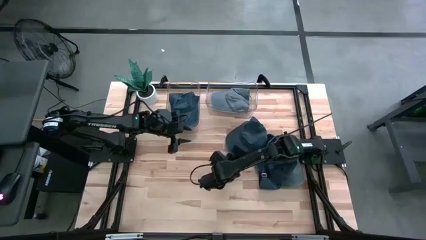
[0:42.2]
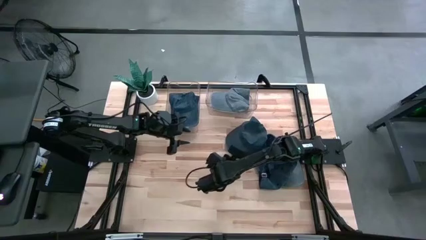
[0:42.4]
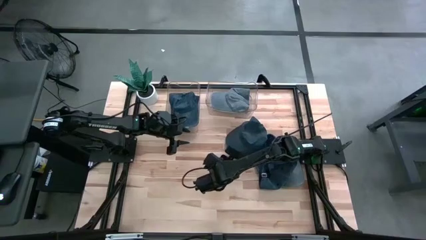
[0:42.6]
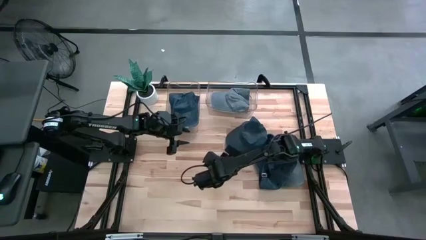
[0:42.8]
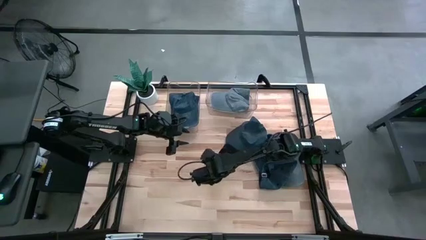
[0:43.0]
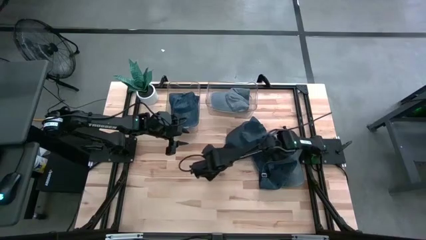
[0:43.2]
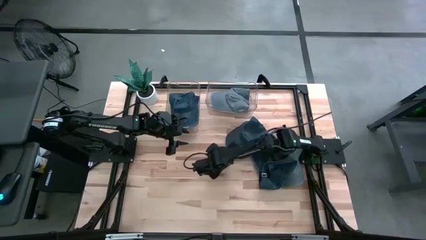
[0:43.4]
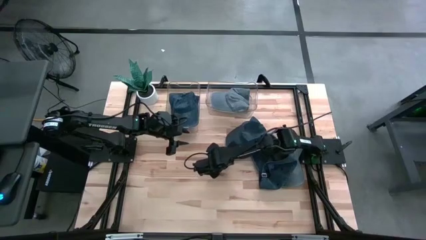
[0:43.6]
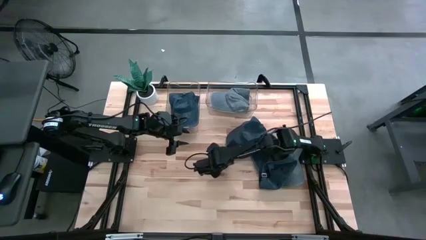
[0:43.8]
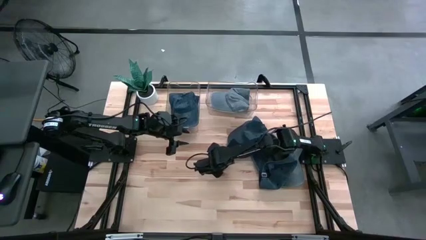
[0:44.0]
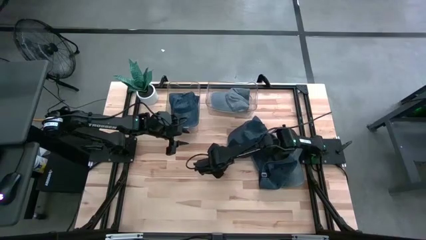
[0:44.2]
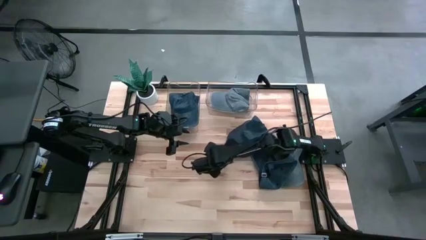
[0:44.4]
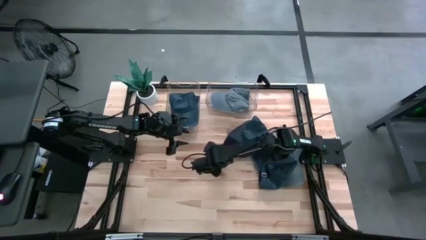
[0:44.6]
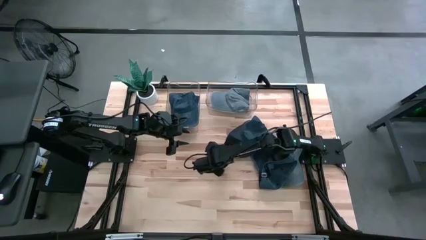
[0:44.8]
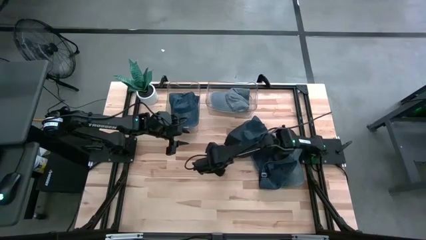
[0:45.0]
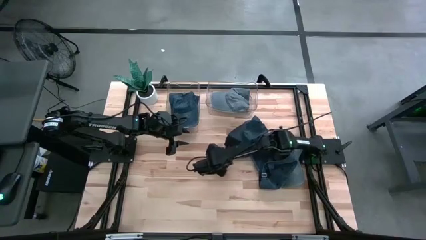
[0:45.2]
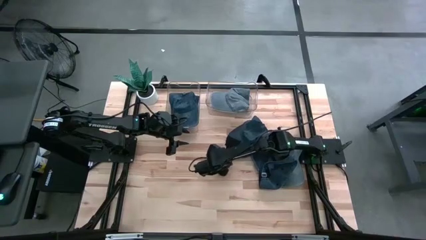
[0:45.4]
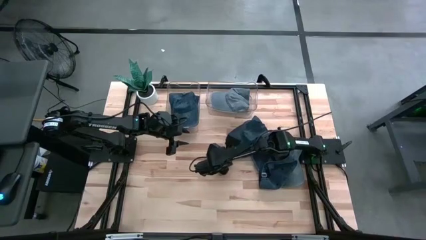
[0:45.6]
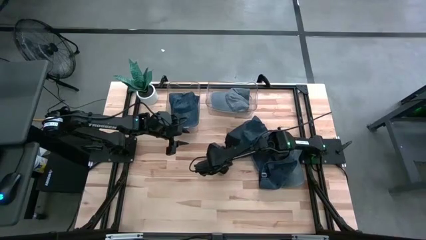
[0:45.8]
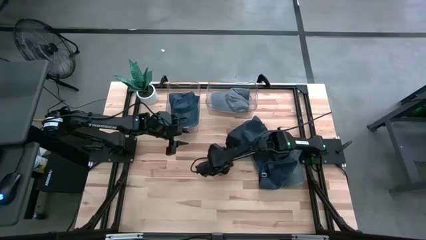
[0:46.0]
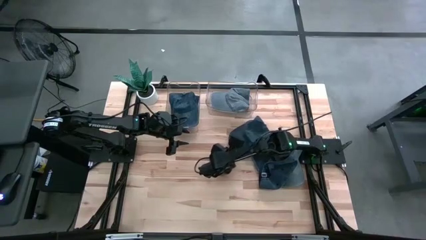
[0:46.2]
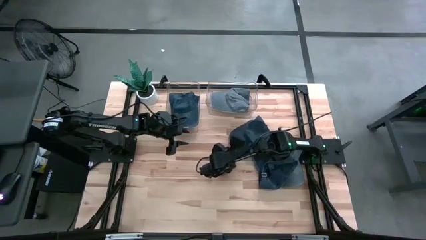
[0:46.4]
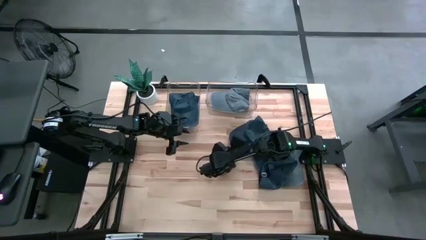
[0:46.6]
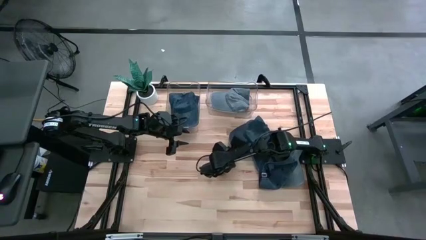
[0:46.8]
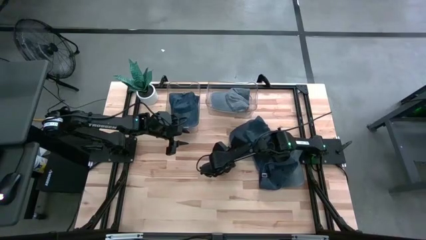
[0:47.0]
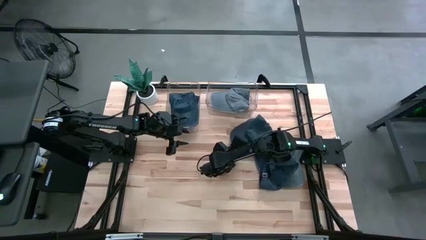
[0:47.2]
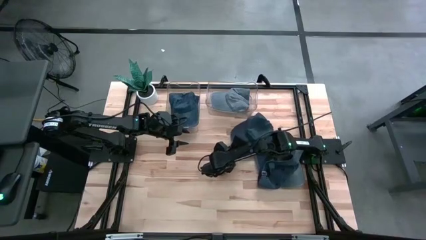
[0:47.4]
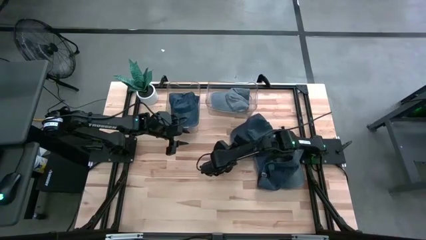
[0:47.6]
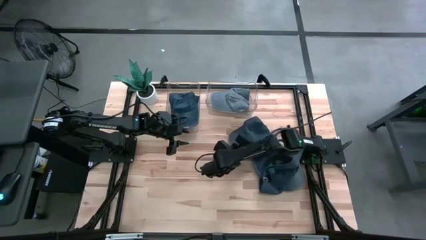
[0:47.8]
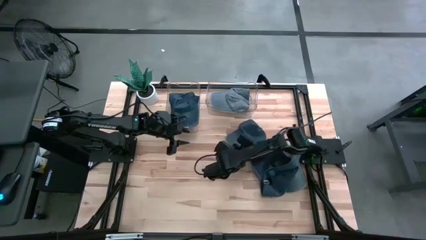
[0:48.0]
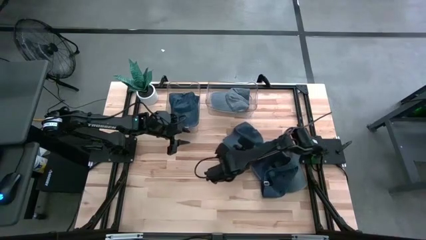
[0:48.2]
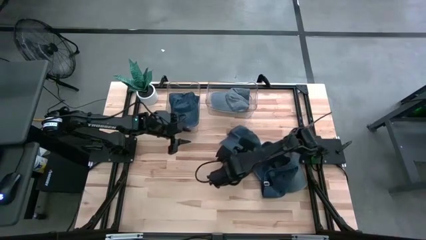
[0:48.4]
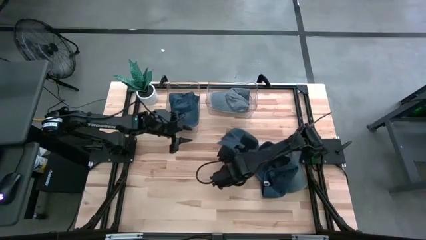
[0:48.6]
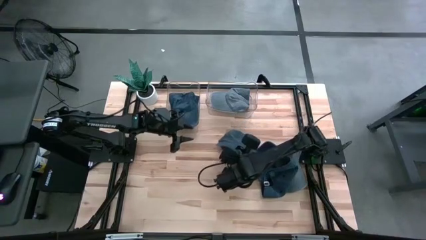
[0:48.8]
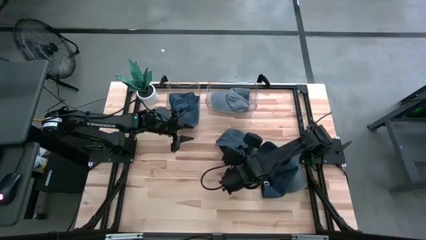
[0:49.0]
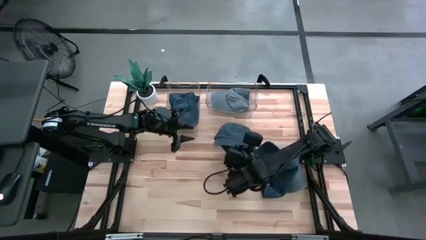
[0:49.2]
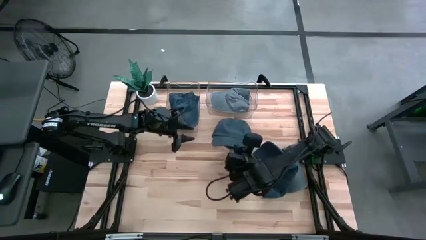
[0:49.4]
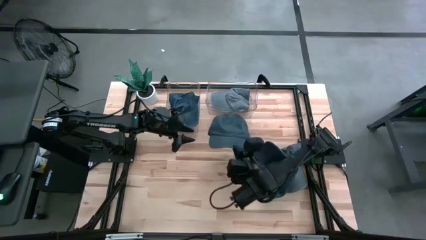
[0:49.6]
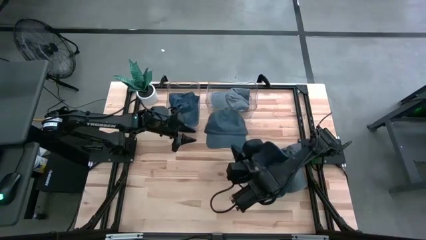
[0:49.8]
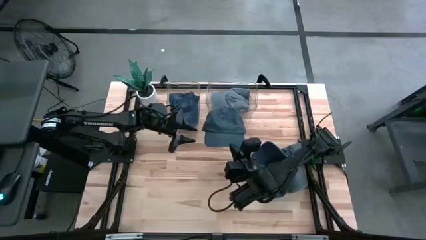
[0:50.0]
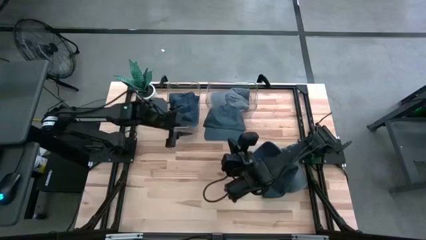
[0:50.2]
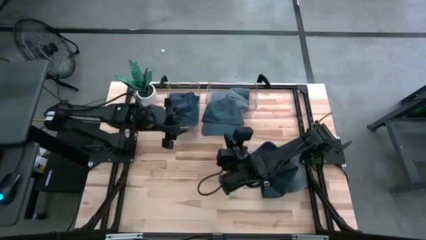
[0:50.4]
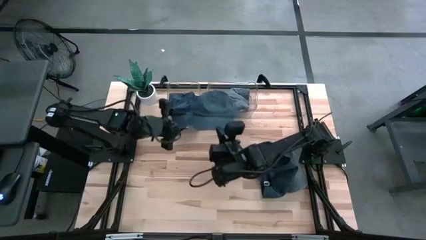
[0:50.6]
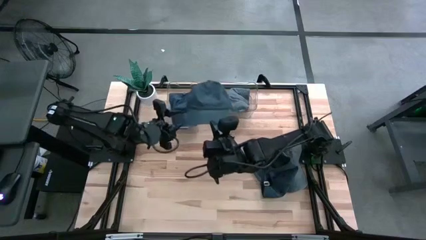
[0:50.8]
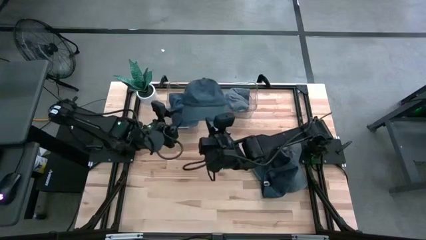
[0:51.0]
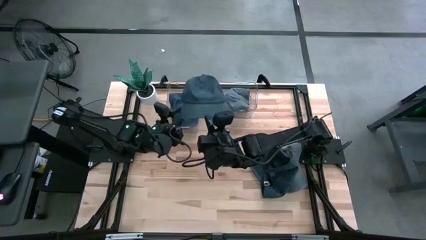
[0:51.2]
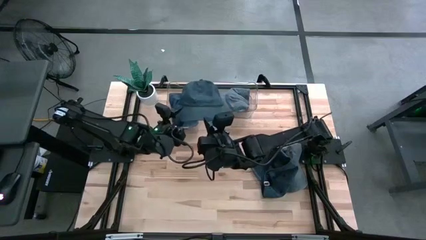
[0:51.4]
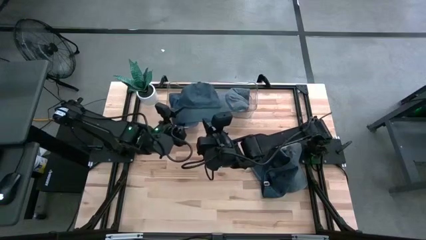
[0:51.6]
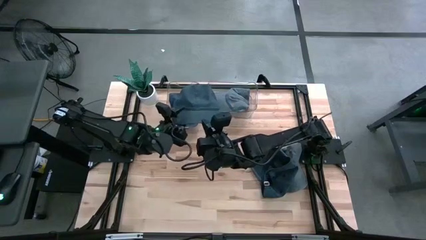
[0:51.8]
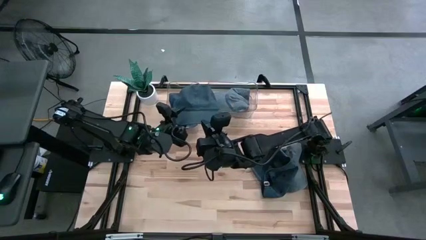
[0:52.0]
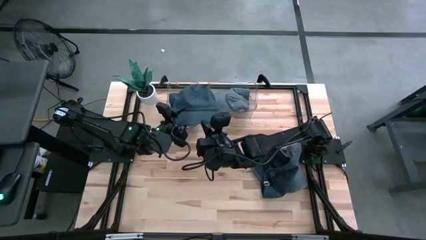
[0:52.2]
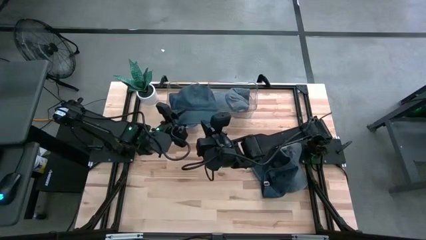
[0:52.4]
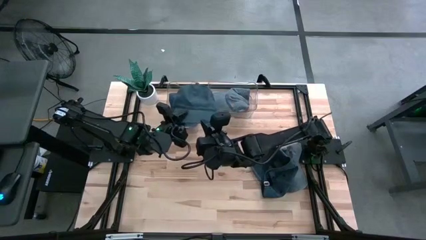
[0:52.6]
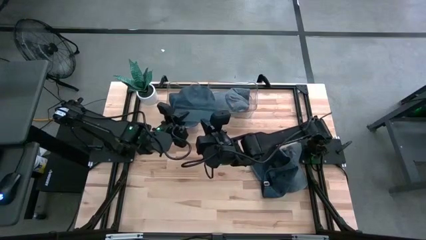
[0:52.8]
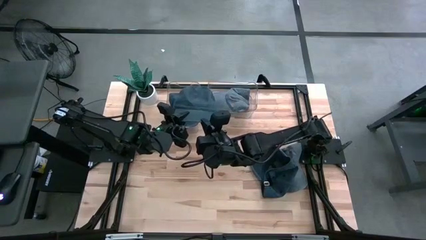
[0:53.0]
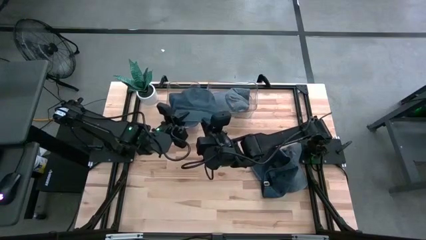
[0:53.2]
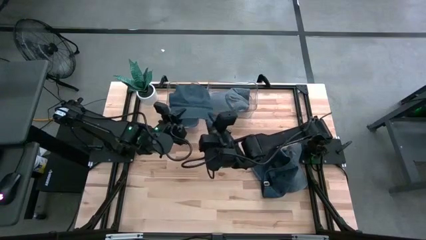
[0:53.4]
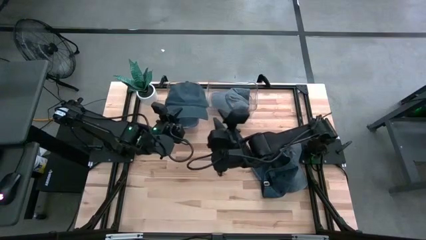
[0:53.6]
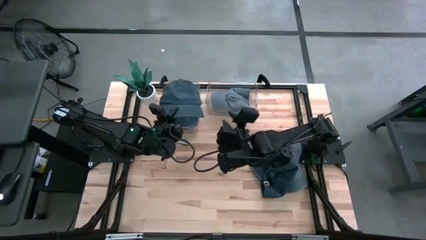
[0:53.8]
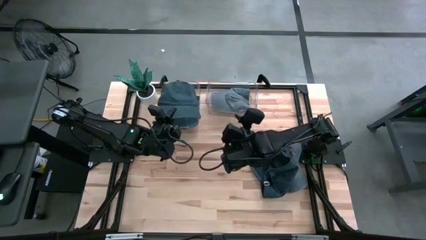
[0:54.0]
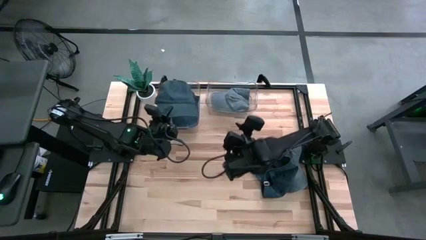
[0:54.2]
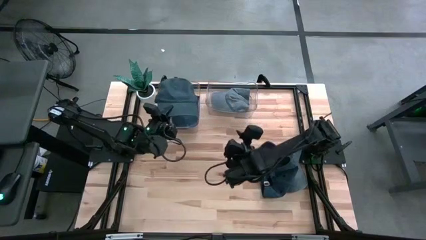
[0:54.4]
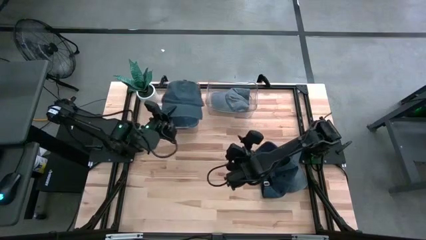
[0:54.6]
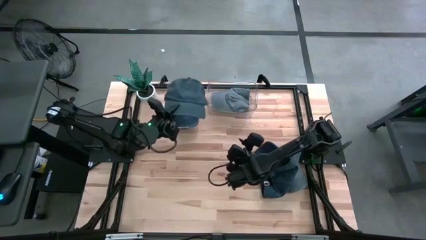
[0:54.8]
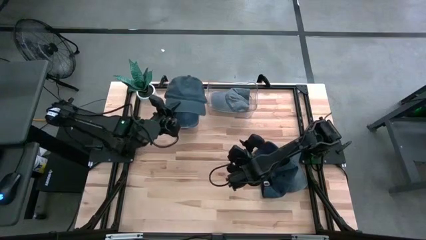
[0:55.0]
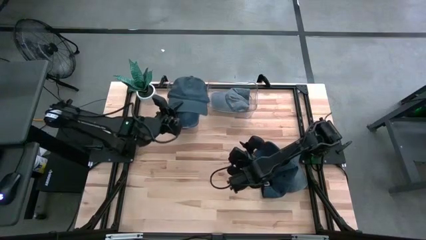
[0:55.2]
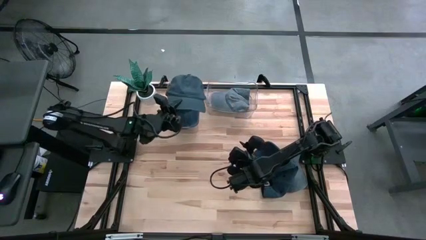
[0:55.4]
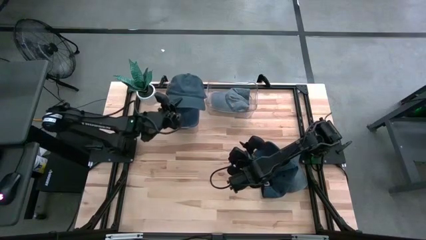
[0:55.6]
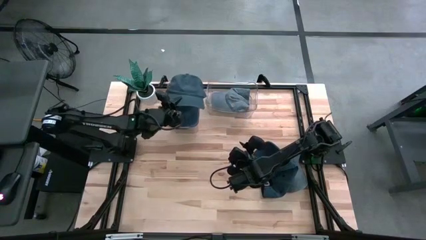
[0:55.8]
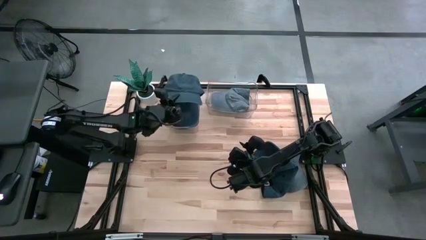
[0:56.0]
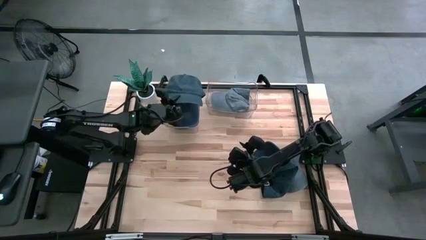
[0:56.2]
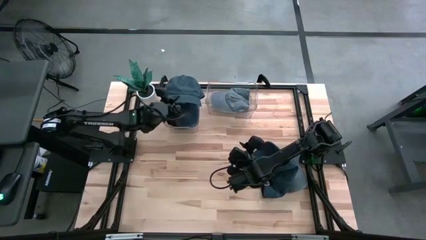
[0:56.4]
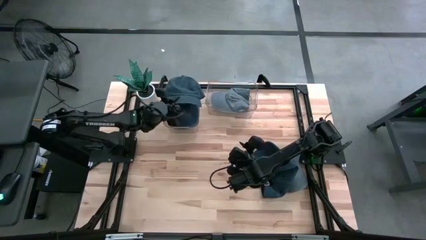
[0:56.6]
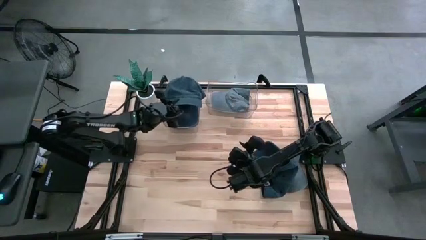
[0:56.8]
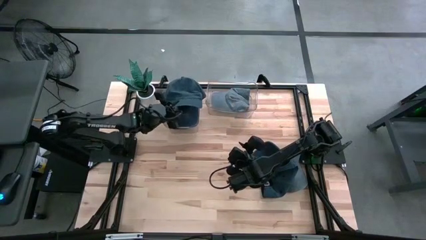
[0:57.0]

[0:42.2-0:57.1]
Task: Pick & Place hat
Put the top blue cap into the left transparent bin
